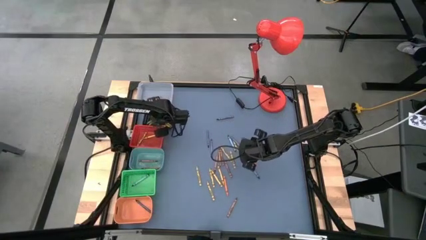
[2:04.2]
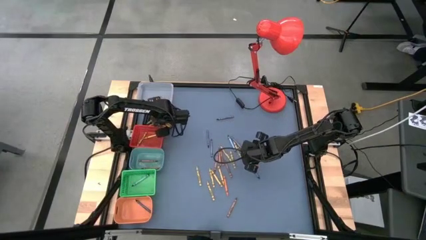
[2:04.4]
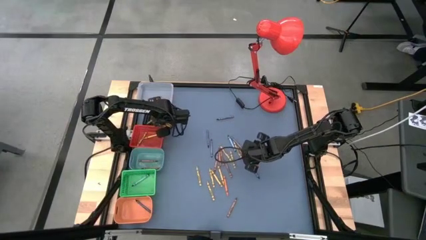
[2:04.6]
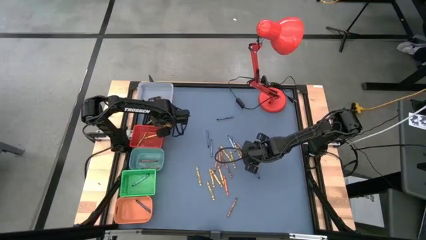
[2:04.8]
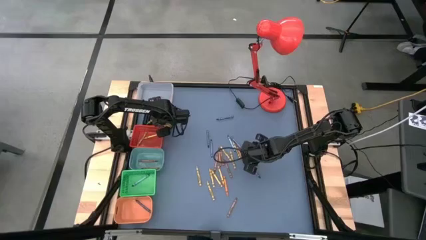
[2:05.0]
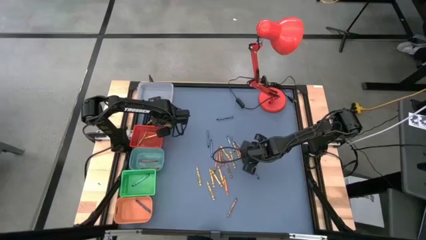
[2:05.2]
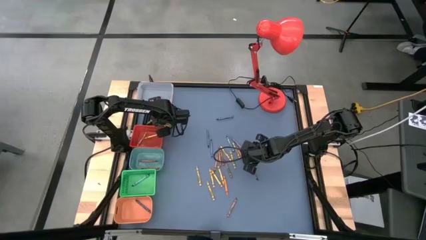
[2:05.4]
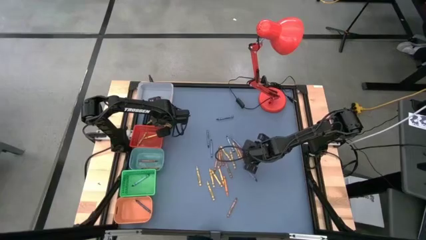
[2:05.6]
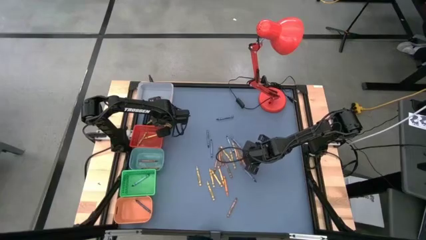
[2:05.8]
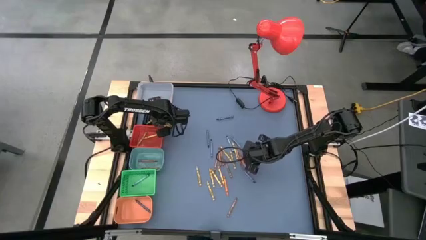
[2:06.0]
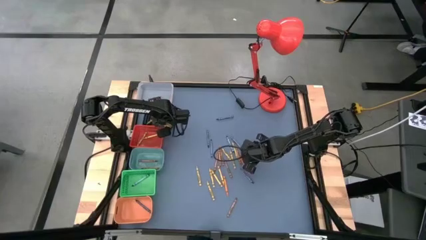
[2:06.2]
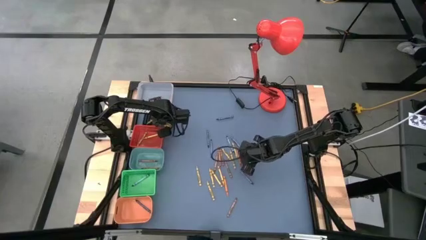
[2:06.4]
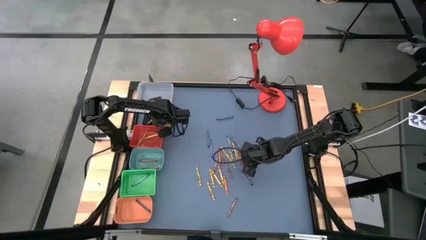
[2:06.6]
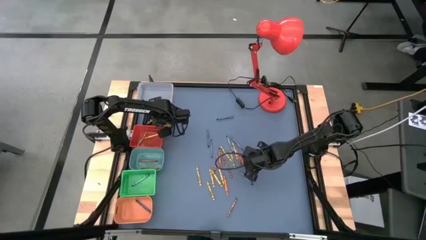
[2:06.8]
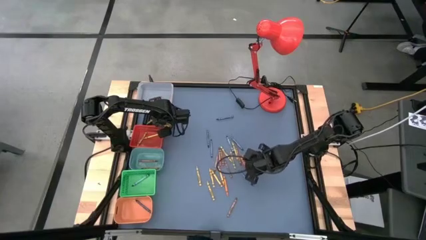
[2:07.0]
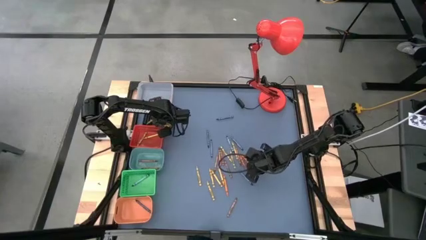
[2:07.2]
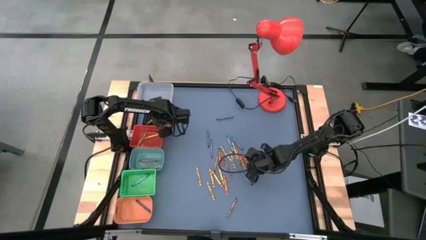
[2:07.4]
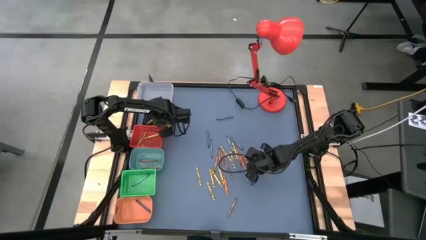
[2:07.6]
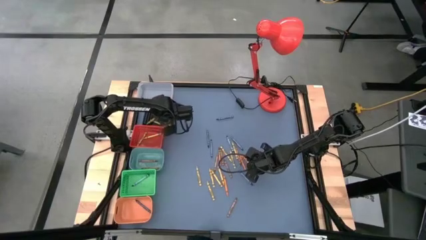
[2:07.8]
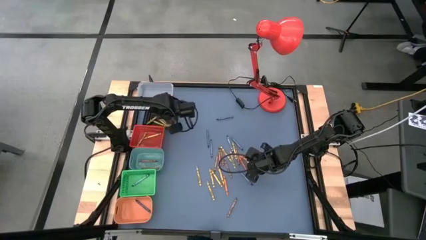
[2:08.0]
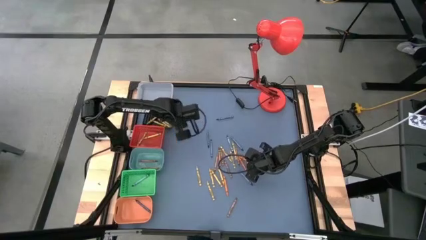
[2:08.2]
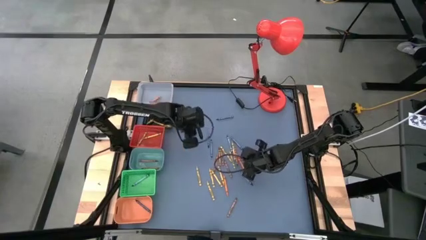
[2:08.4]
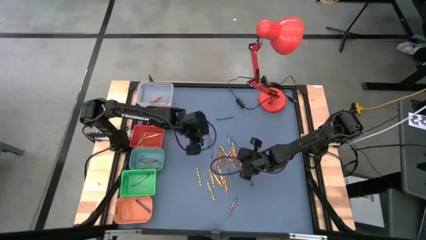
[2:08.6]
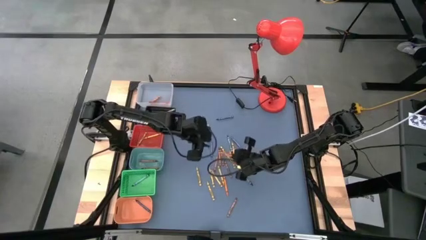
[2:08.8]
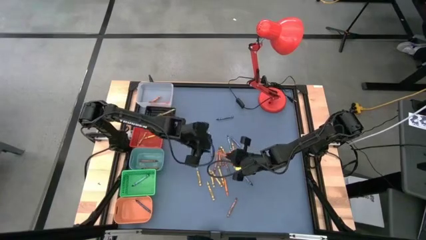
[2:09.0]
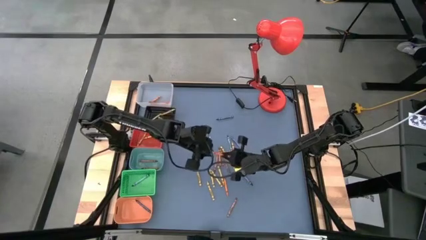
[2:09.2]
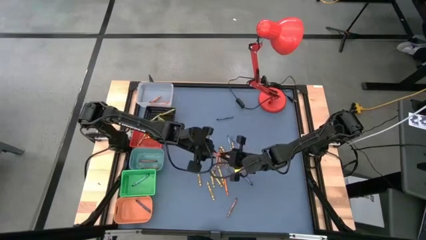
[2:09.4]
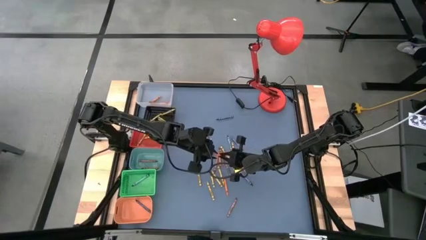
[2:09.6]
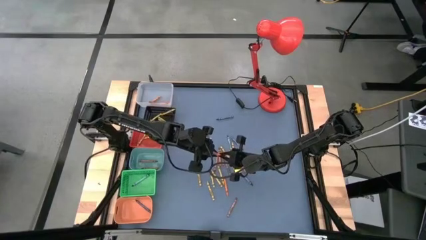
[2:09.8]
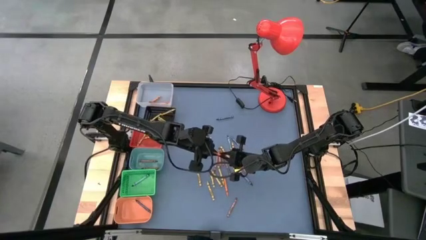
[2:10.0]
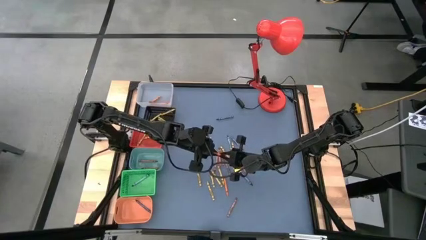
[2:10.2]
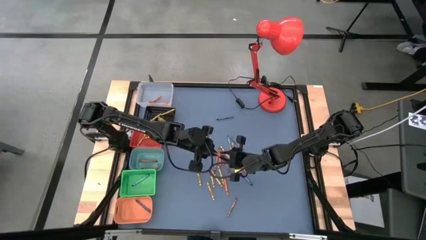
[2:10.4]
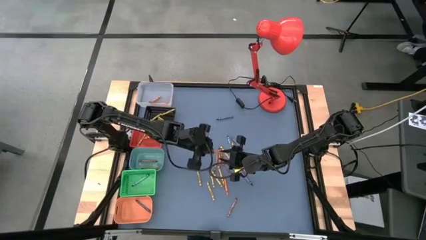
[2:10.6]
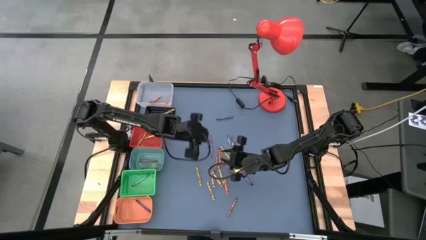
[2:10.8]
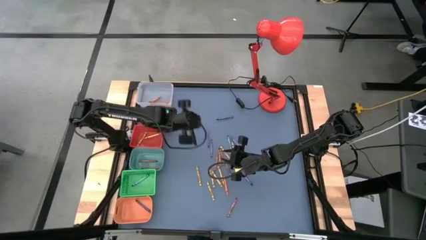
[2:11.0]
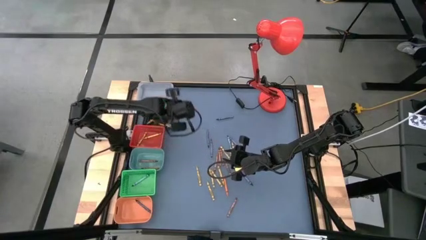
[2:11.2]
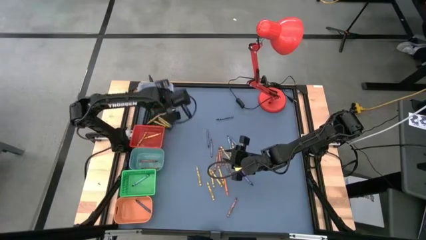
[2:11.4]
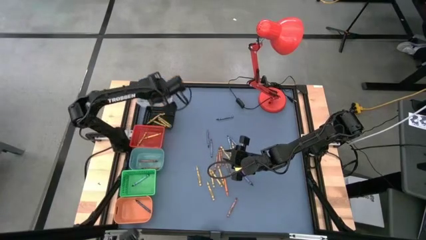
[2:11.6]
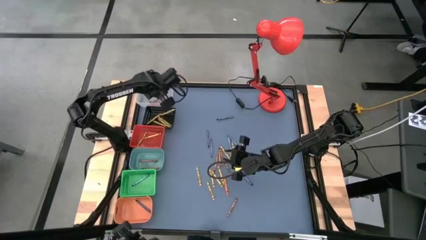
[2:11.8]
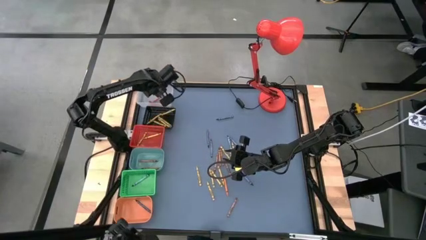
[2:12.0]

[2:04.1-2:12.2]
Task: Sort crayons
Put the orange crayon into the transparent bin

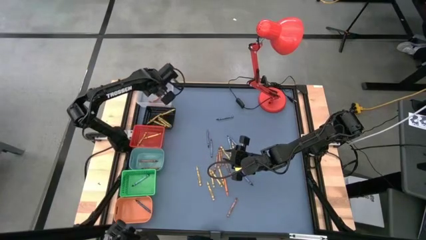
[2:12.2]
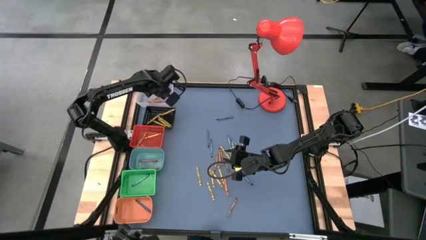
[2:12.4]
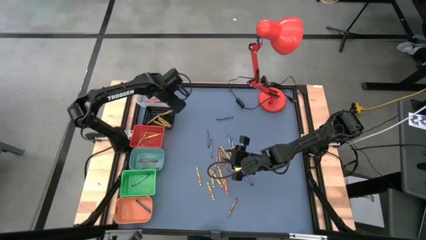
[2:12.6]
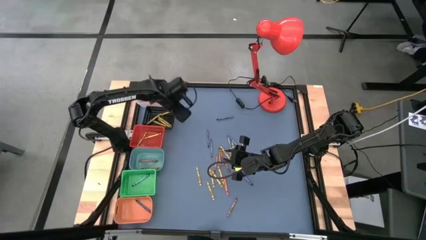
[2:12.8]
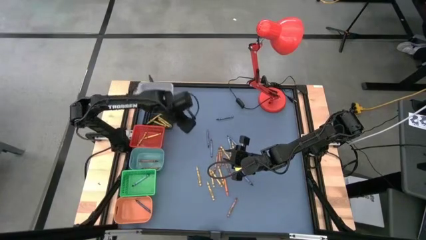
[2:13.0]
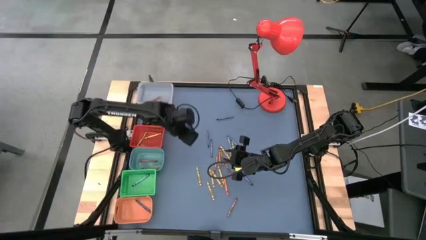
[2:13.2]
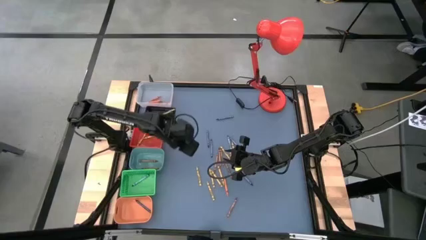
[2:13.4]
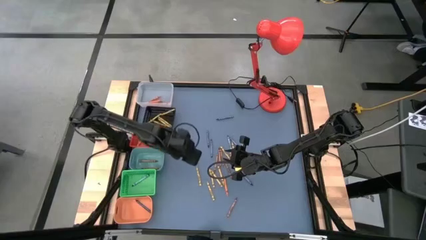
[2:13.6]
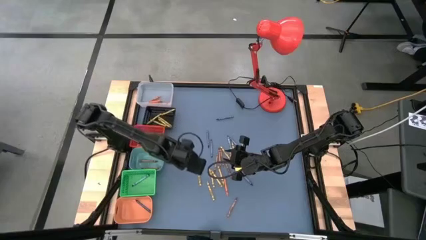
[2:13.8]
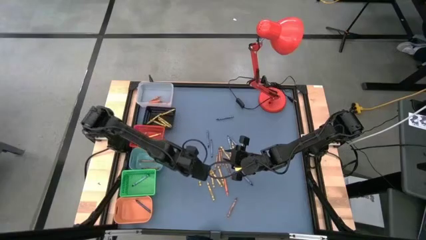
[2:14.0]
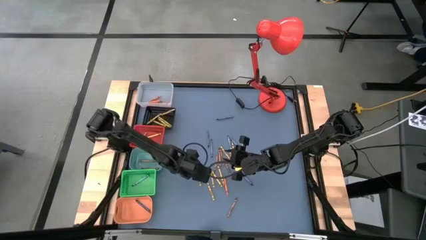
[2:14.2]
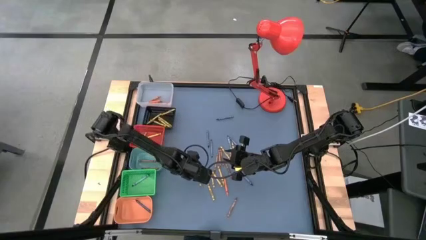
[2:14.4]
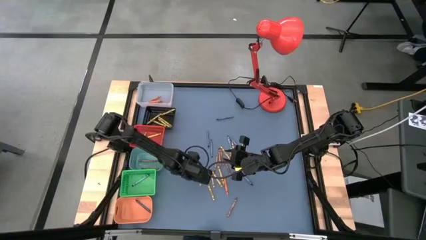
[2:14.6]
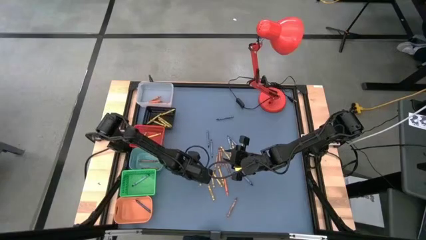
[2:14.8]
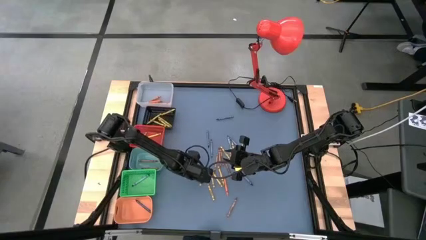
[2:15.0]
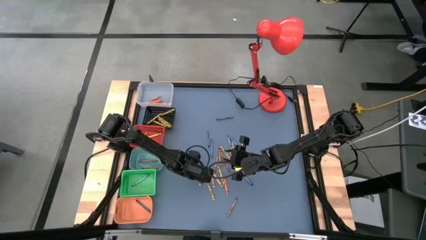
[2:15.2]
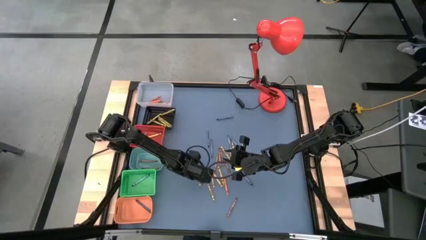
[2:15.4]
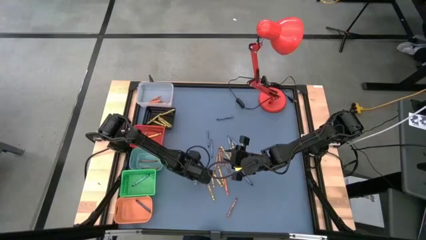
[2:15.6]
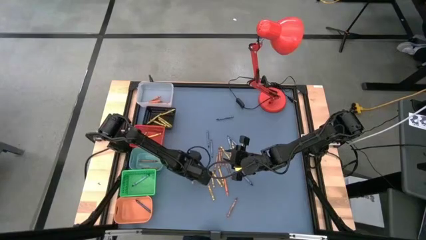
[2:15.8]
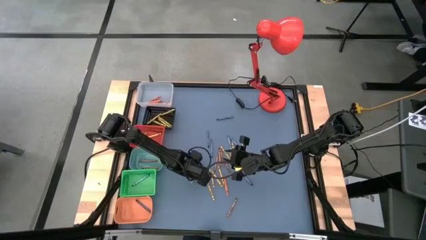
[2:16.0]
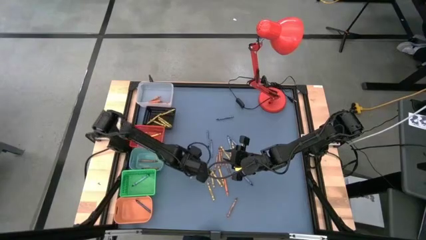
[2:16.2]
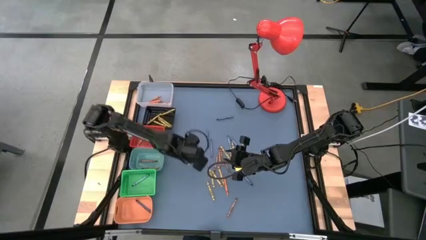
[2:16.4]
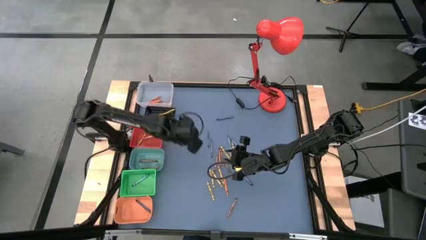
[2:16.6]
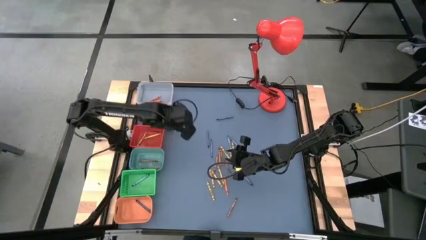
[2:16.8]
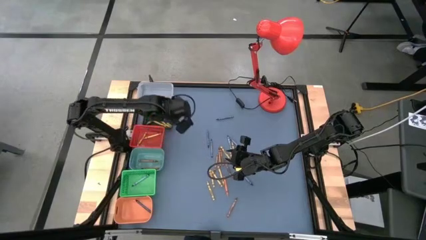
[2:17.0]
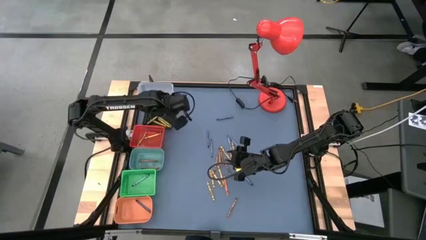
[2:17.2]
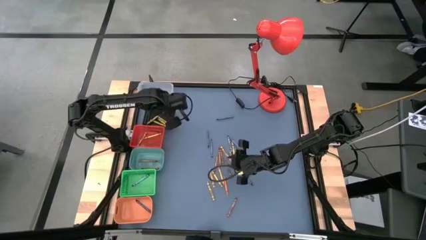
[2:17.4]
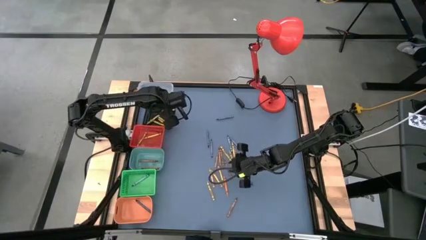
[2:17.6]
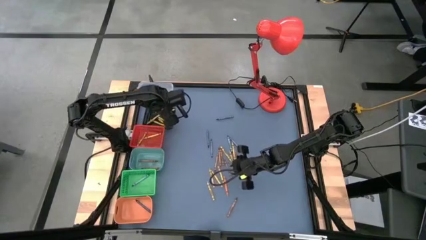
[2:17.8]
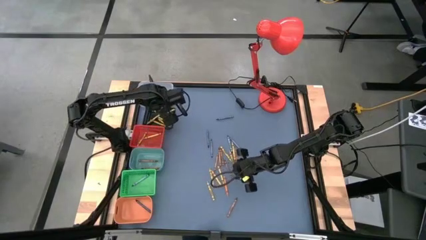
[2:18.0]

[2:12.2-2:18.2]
Put the green crayon into the black bin

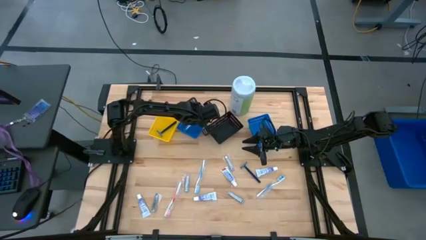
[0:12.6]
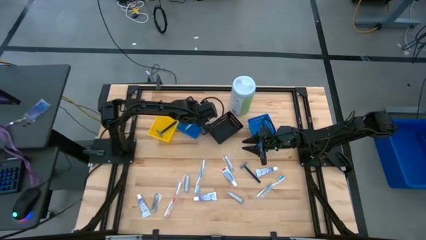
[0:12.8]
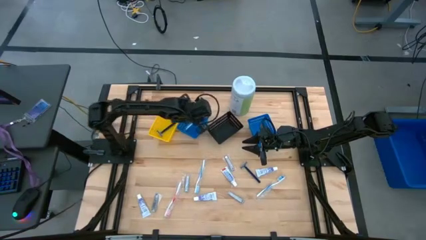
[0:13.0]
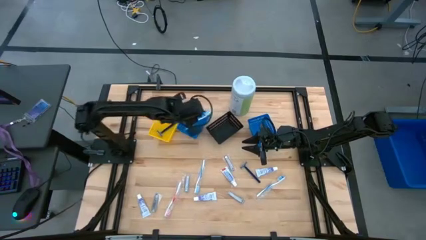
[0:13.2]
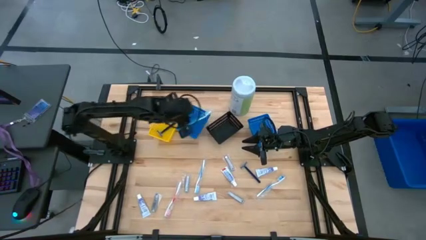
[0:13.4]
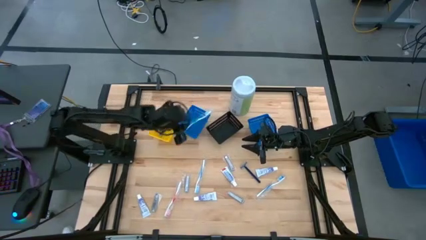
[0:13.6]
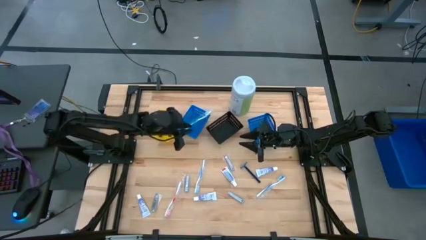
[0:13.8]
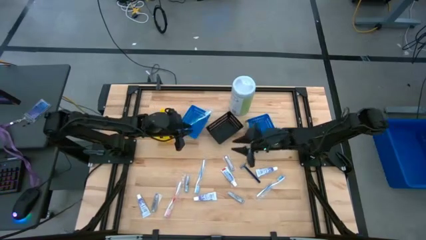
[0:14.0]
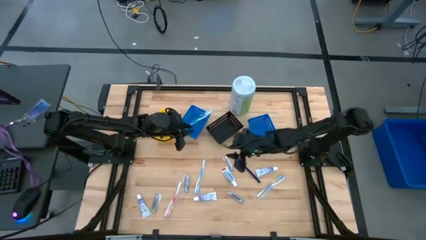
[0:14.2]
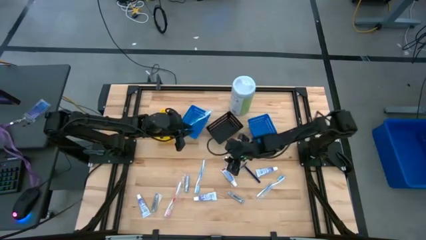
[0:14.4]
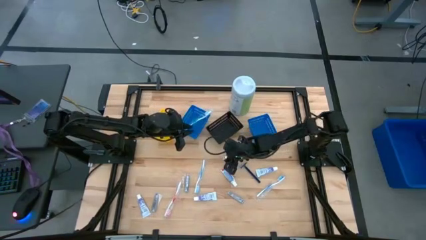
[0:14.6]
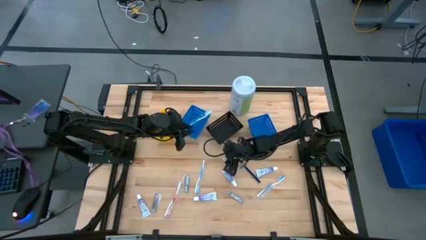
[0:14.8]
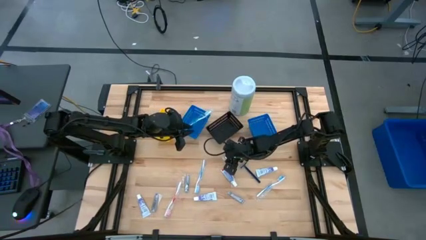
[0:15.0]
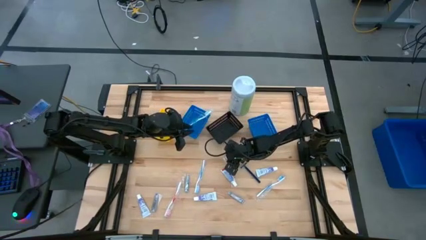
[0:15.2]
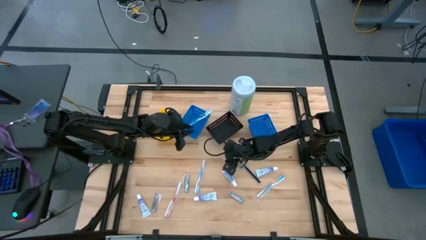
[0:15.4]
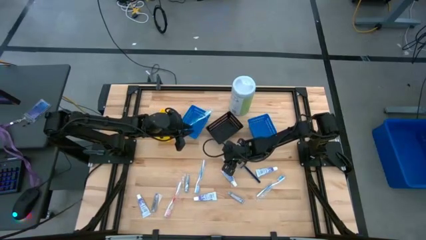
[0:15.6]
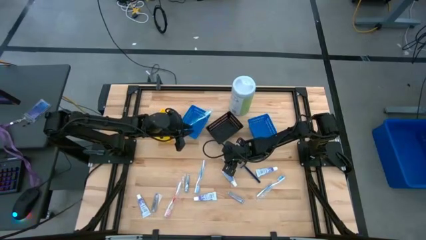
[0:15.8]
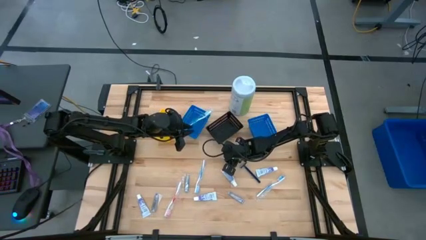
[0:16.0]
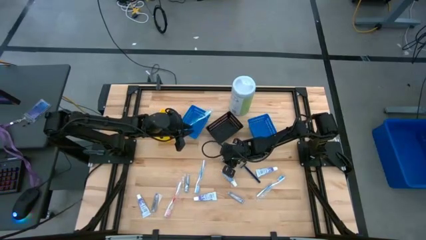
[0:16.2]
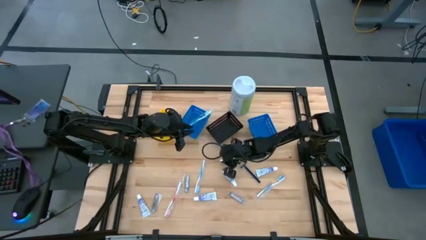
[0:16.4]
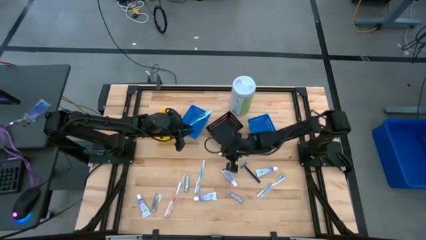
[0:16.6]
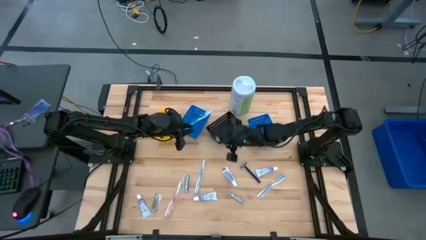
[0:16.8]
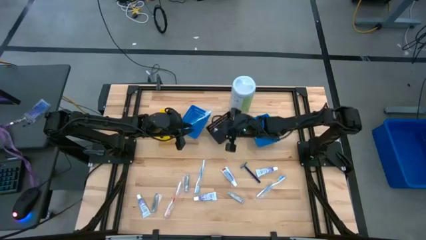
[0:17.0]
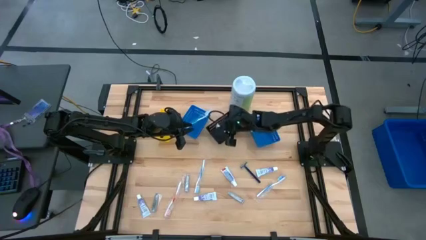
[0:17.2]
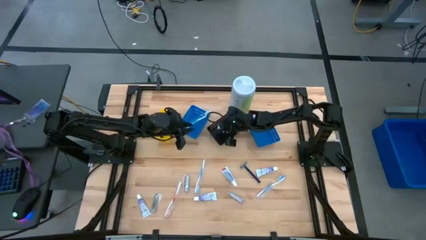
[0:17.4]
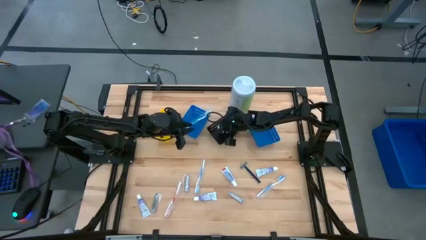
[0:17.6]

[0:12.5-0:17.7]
Task: Pick & Place Travel size toiletries
Put the silver nail cutter into the black basket
